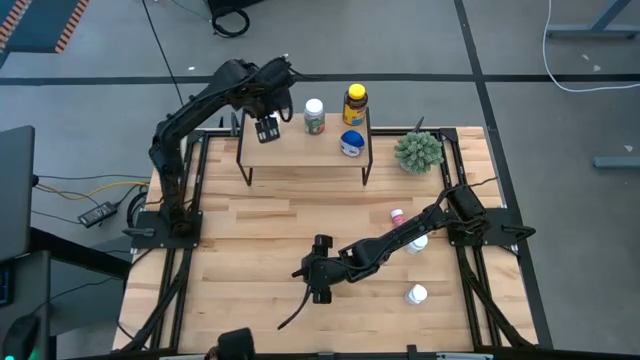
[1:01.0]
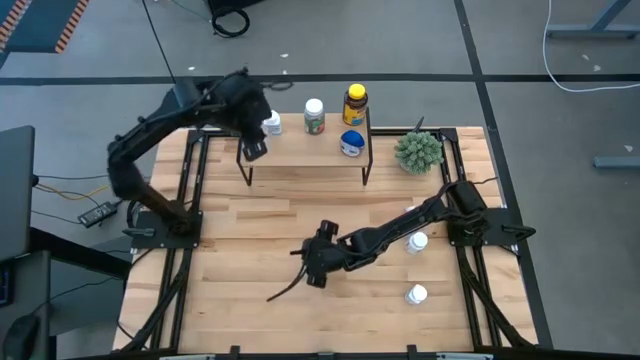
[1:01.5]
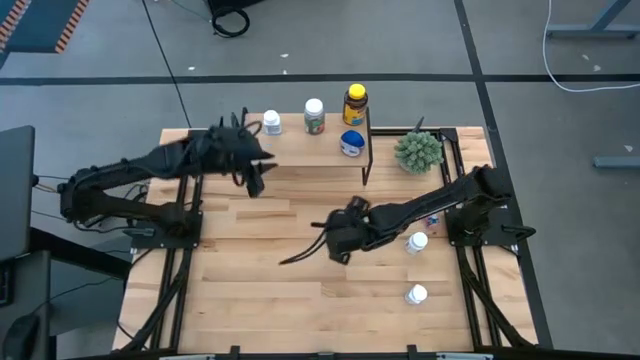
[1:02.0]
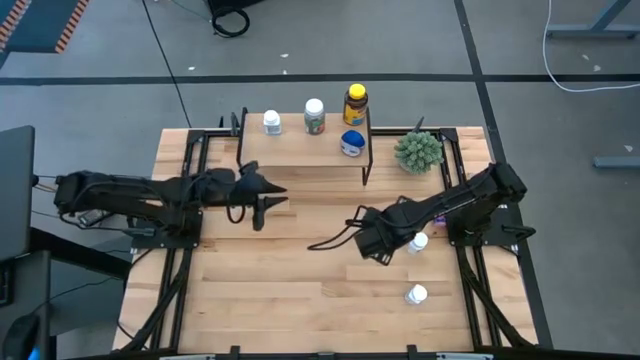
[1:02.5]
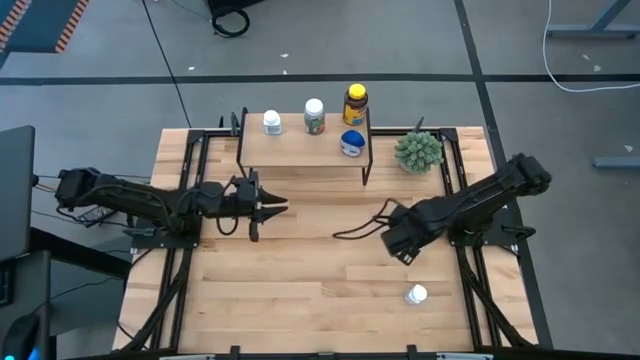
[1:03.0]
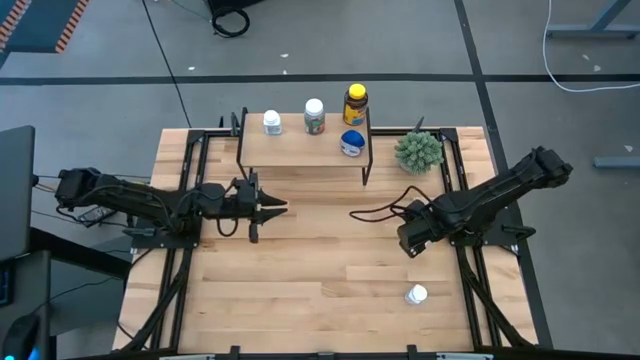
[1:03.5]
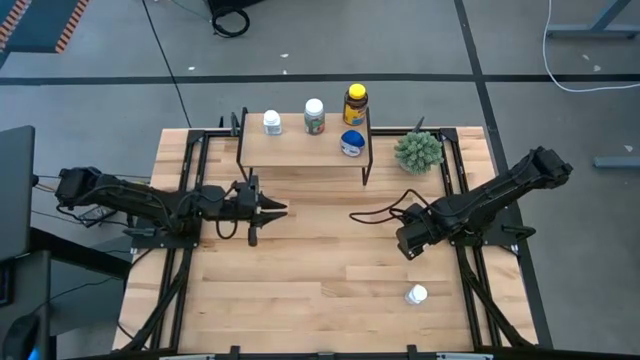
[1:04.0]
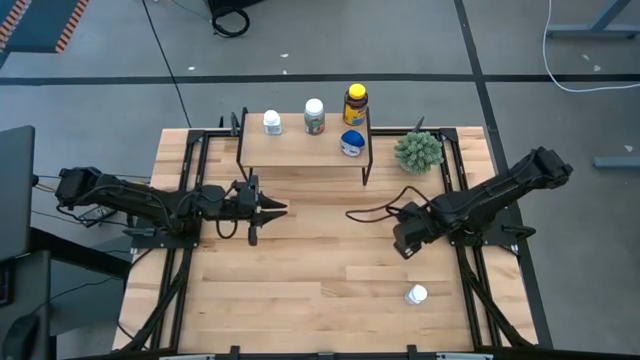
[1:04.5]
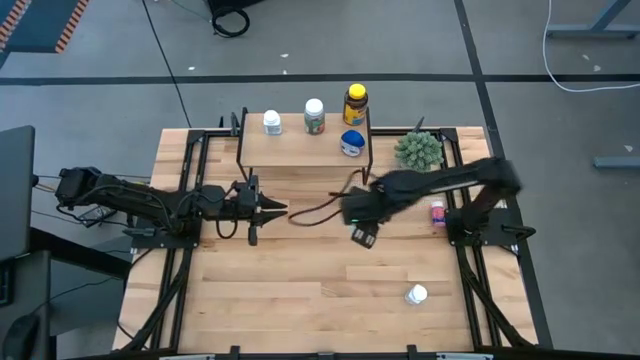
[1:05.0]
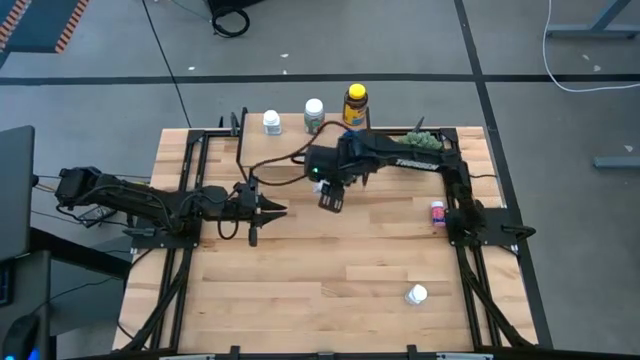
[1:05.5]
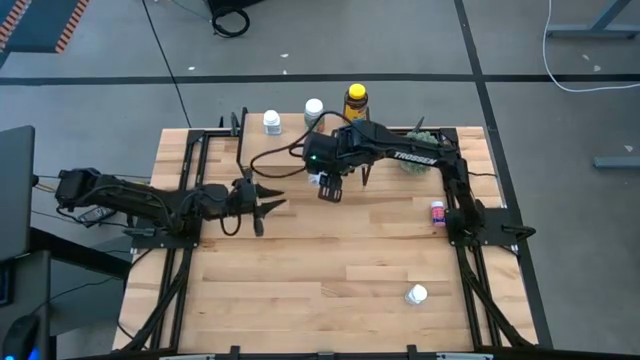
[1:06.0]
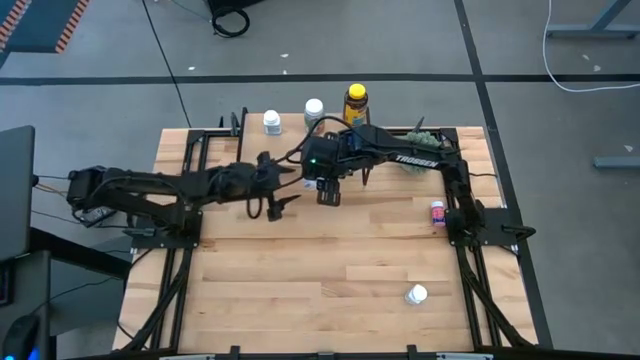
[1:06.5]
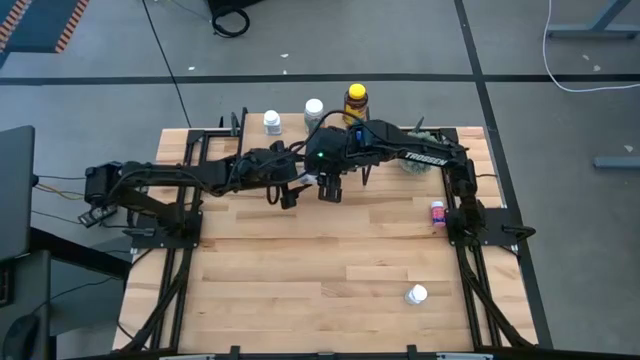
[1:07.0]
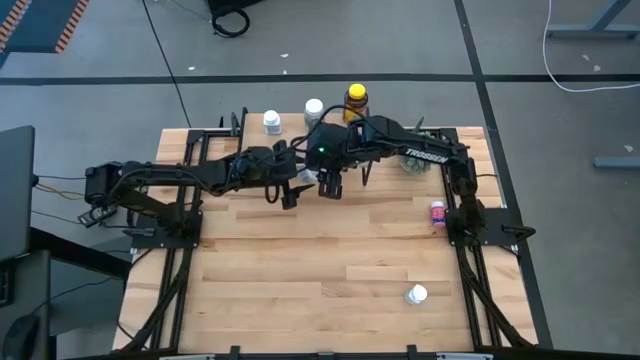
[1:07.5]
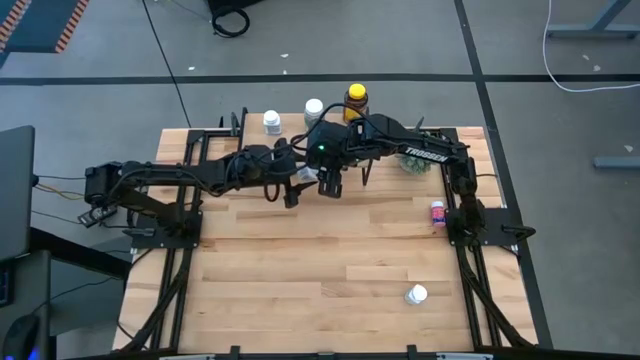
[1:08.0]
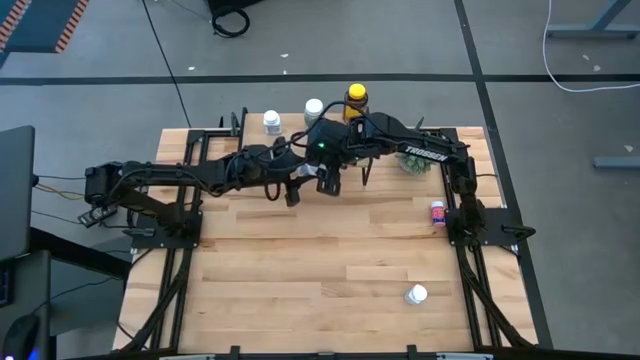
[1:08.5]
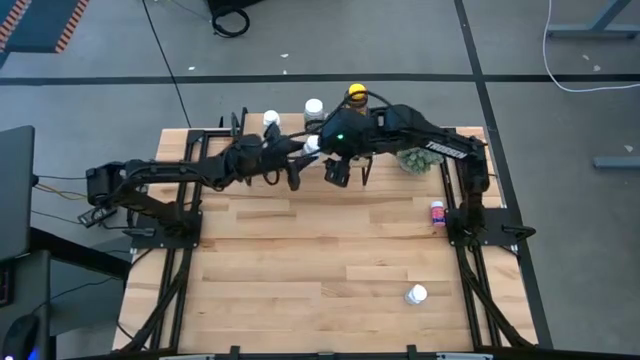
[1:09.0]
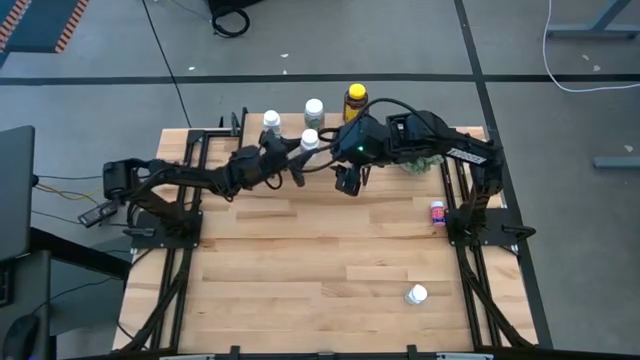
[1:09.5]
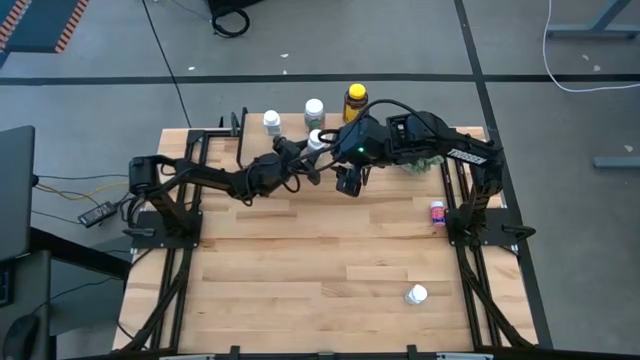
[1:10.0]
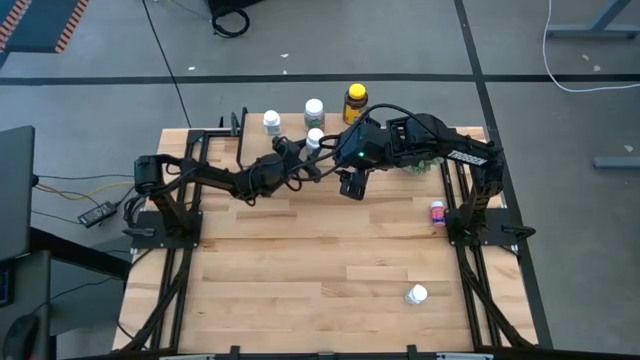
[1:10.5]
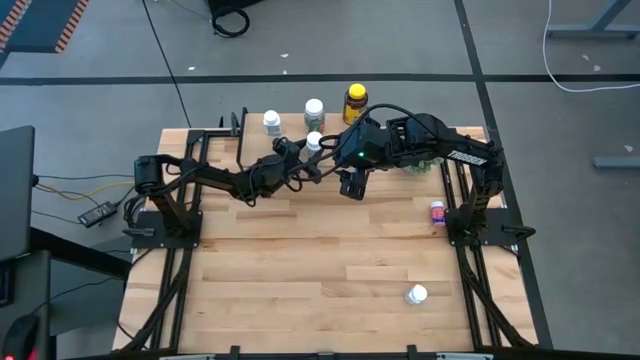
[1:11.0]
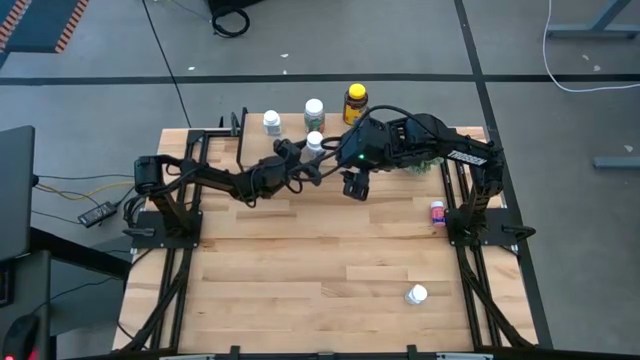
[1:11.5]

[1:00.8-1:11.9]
Task: Pick and place medicine bottles onto shelf by color
Put the top white pill bottle on the shelf

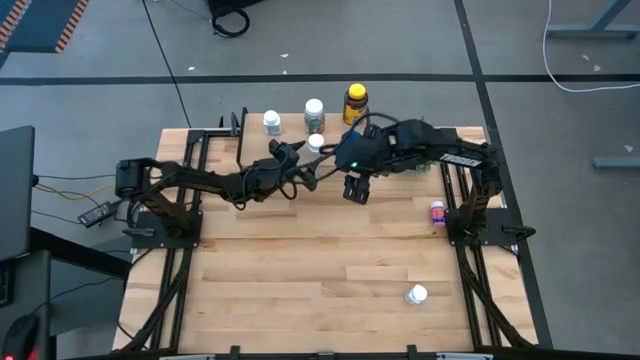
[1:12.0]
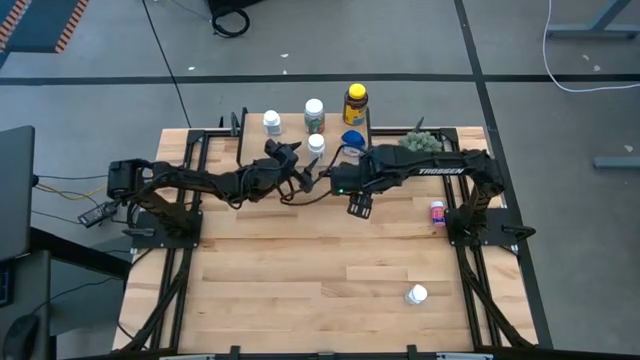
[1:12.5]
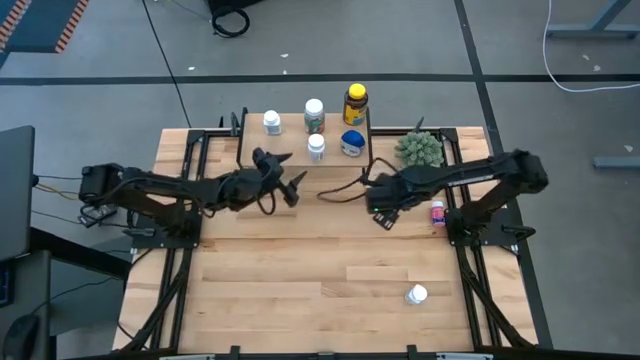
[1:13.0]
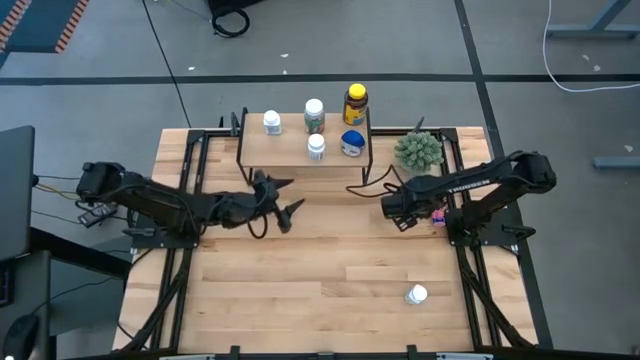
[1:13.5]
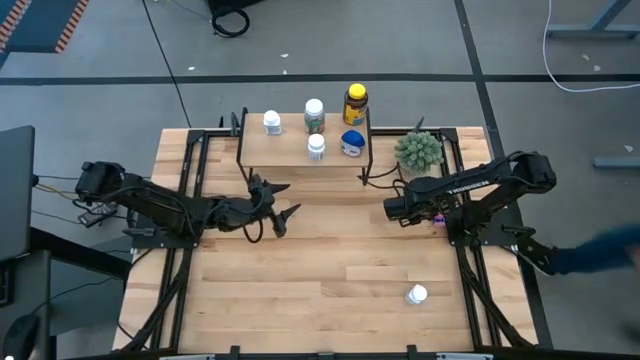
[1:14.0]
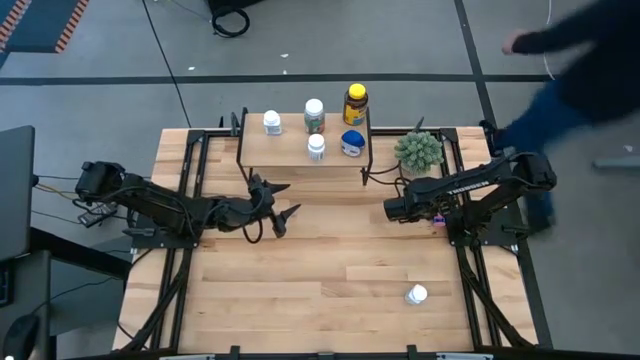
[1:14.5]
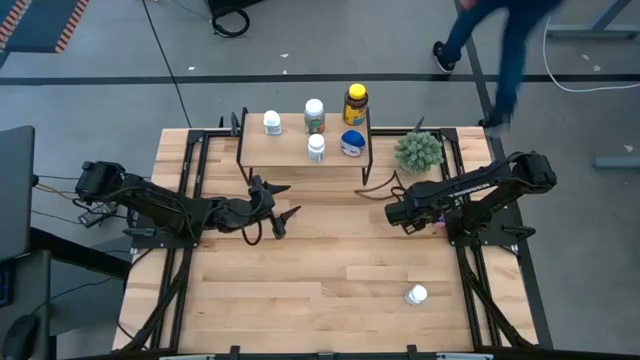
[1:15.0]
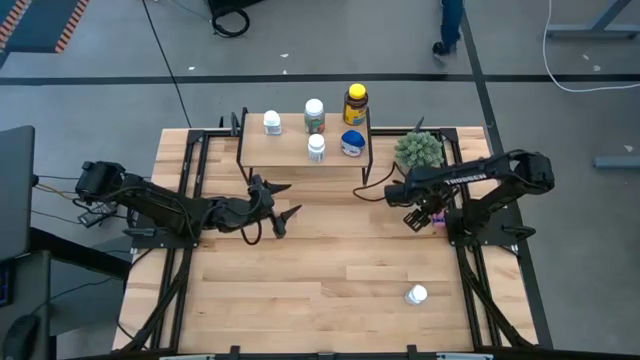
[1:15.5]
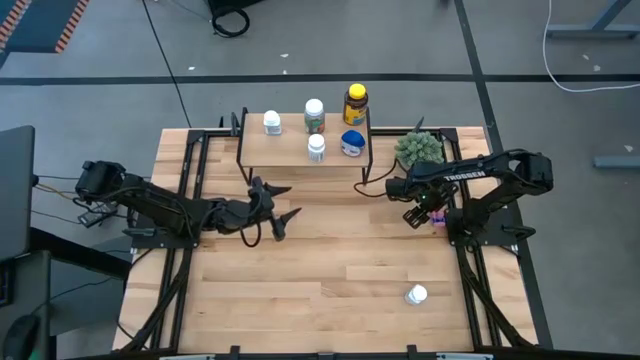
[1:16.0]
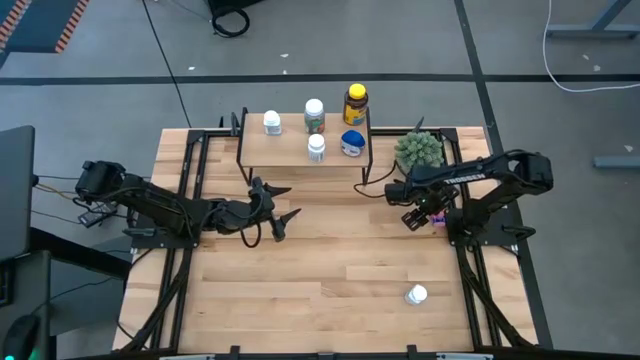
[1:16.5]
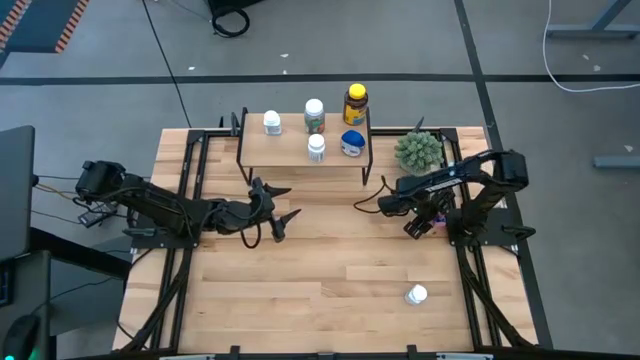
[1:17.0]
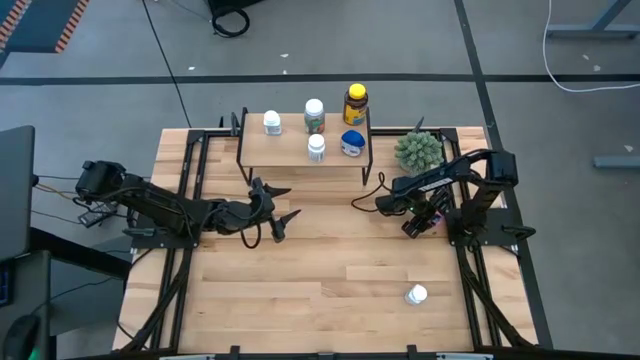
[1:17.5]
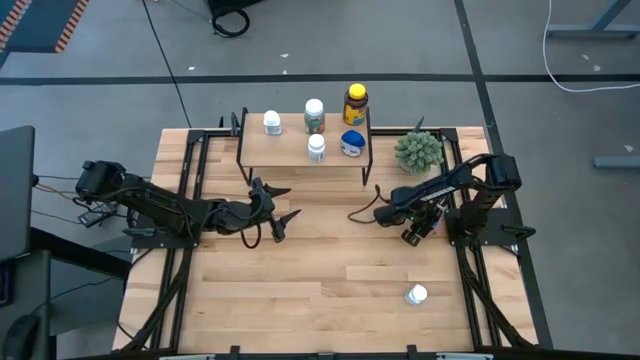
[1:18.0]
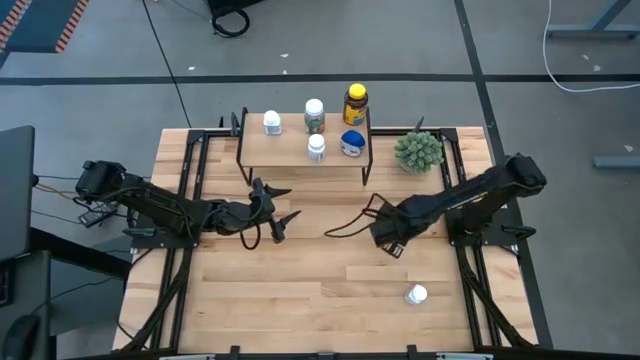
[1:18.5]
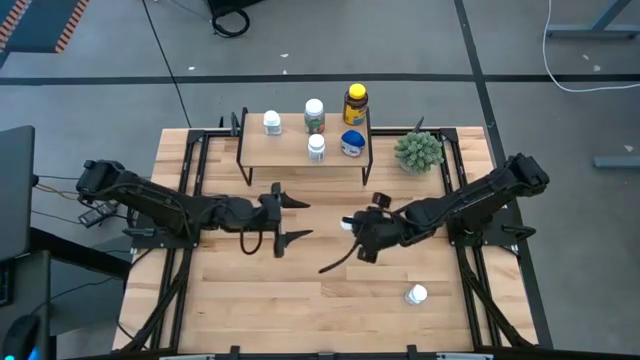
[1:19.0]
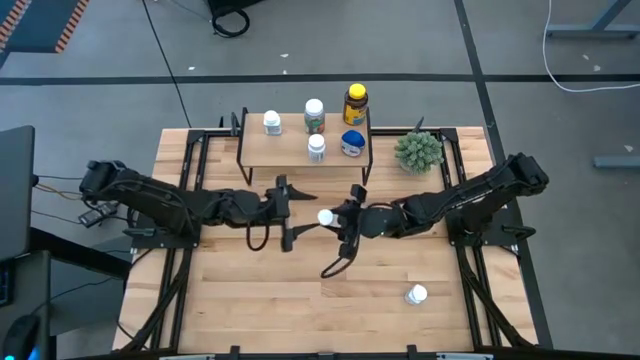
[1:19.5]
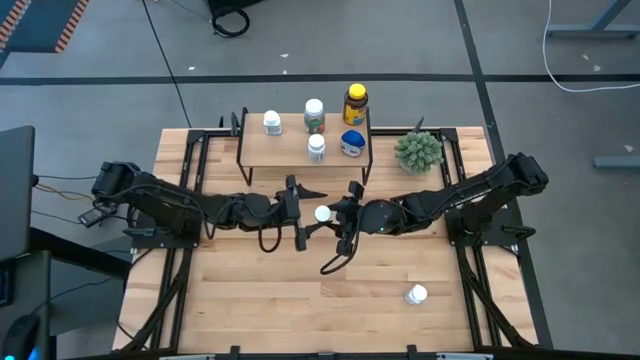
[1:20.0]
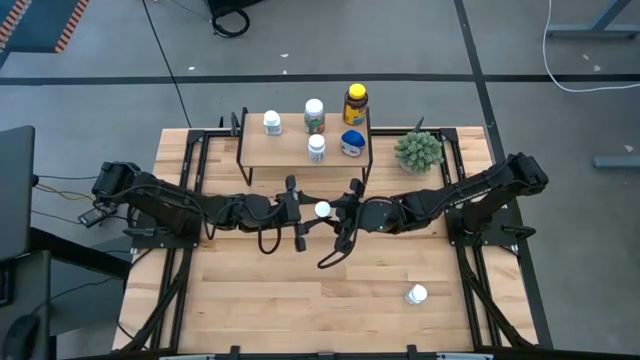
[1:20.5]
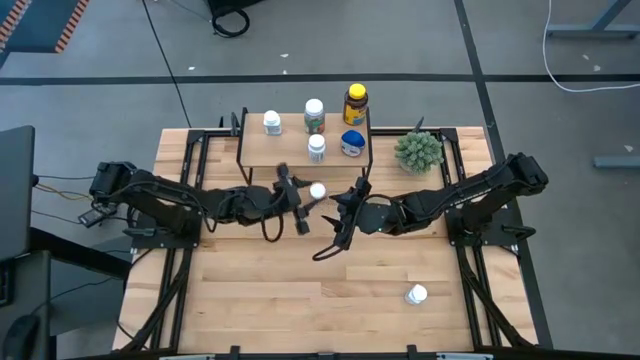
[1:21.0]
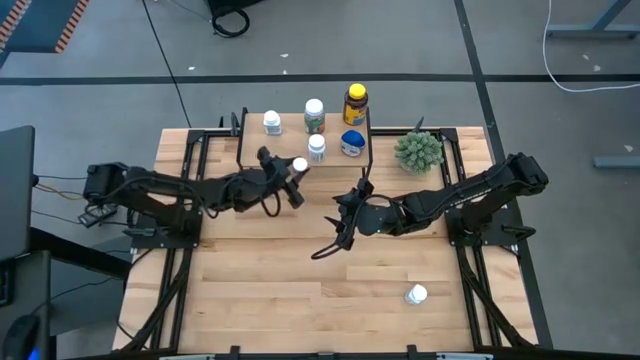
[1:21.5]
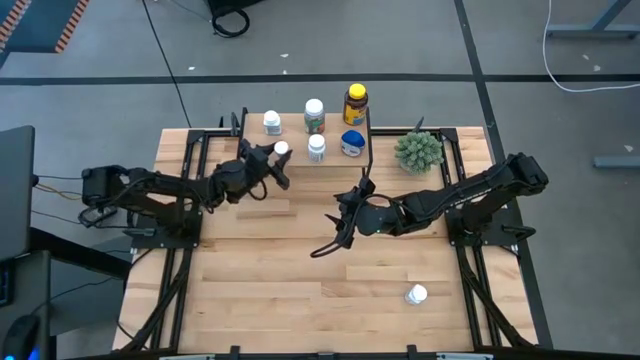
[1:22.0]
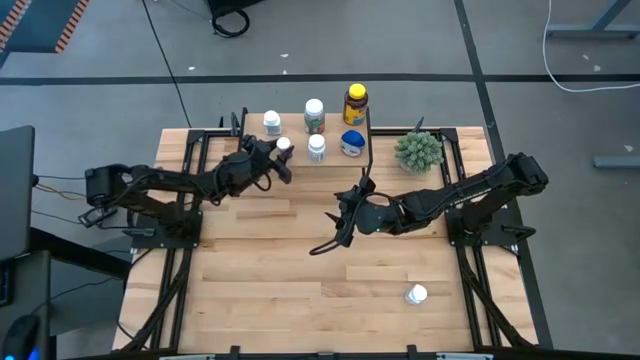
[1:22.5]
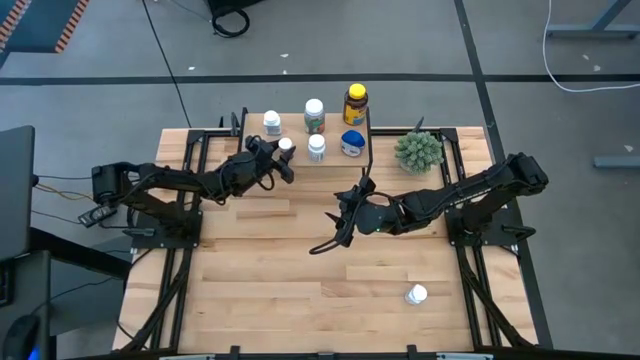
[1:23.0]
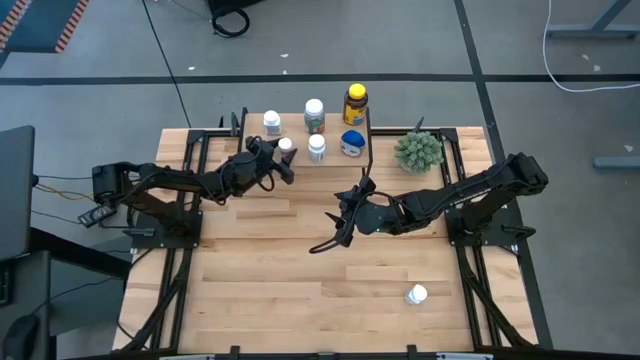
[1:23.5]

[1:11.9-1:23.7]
Put the pink pill bottle on the shelf
